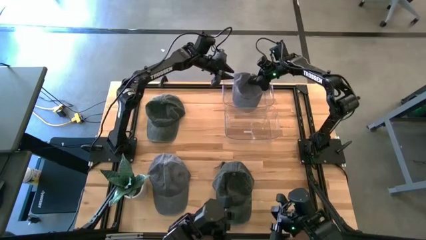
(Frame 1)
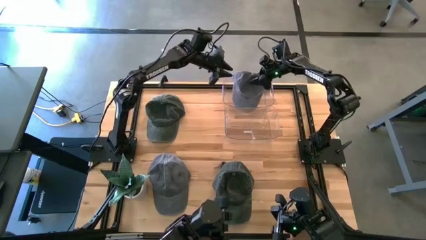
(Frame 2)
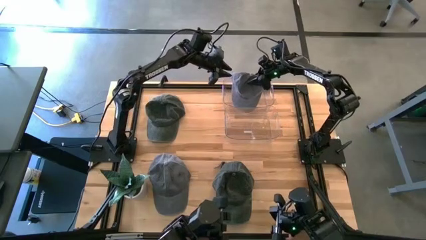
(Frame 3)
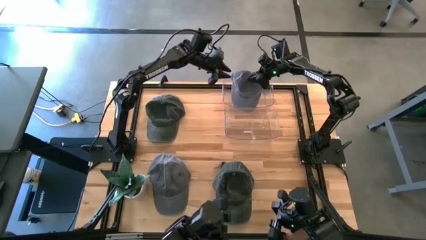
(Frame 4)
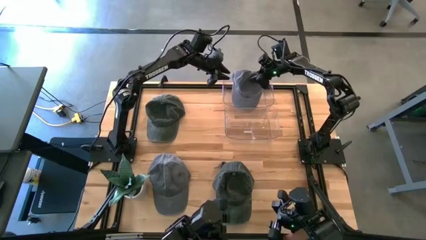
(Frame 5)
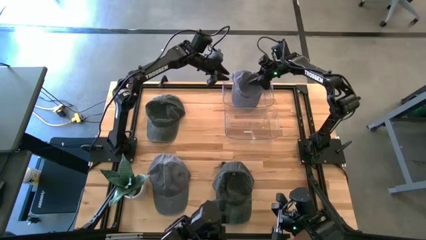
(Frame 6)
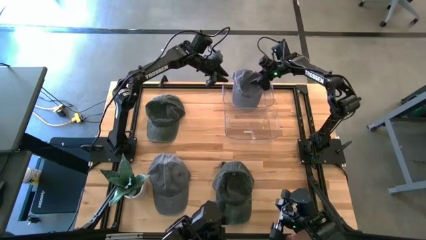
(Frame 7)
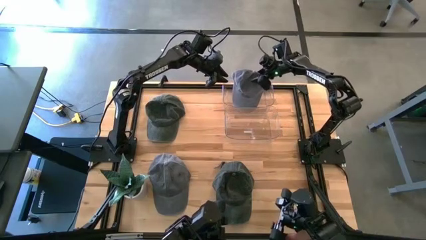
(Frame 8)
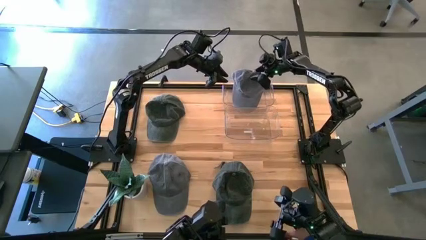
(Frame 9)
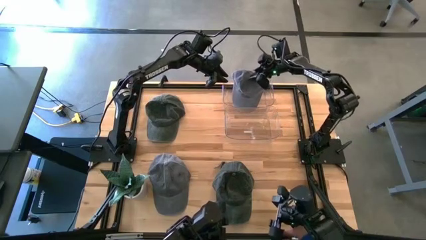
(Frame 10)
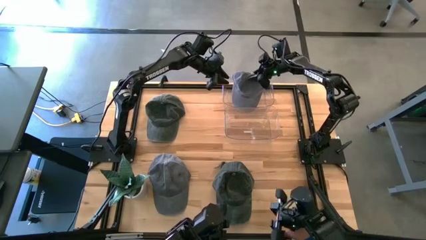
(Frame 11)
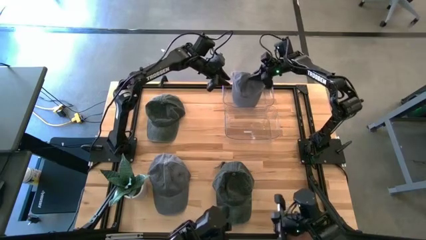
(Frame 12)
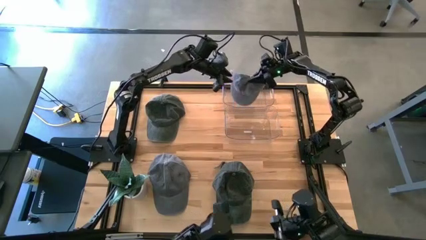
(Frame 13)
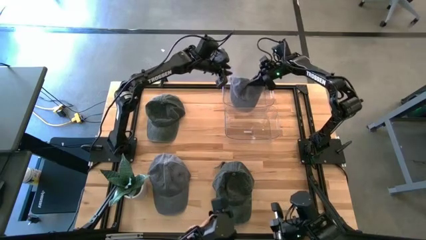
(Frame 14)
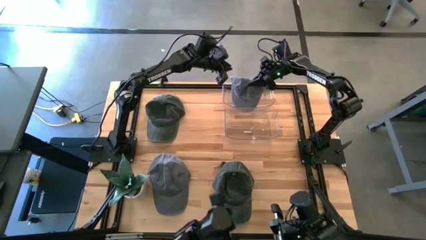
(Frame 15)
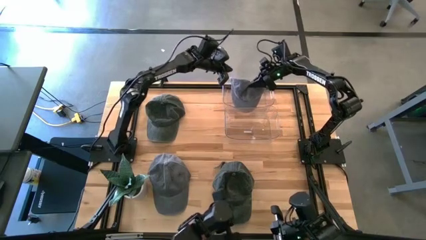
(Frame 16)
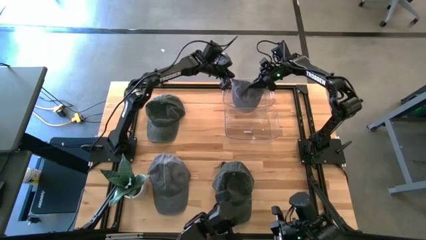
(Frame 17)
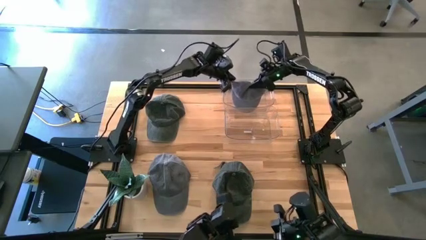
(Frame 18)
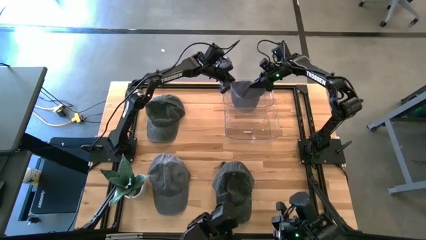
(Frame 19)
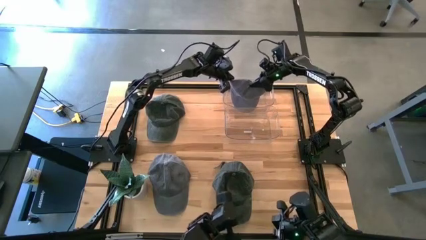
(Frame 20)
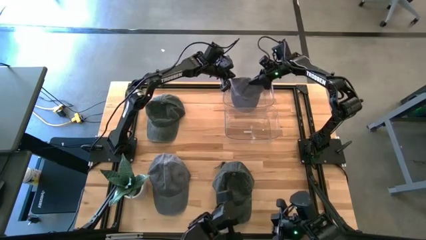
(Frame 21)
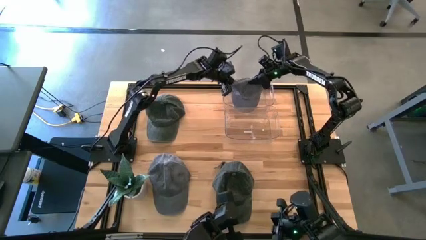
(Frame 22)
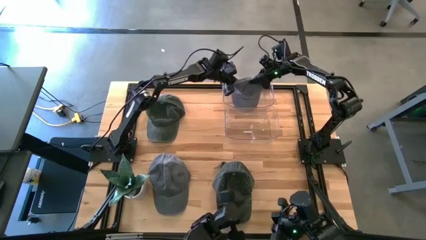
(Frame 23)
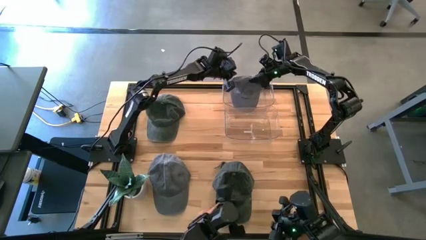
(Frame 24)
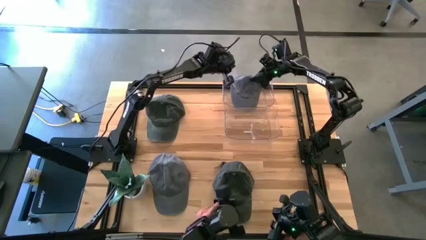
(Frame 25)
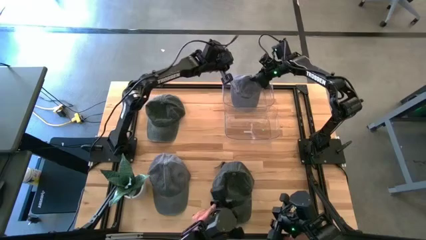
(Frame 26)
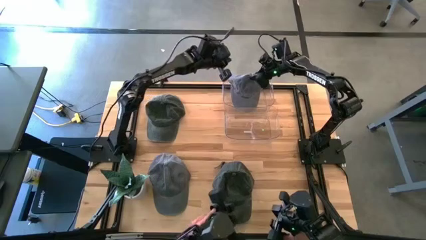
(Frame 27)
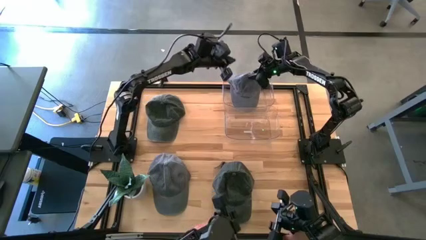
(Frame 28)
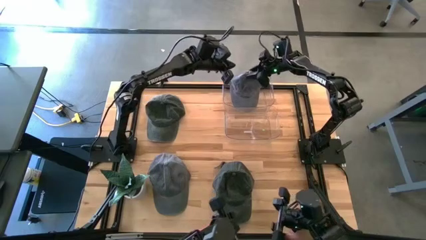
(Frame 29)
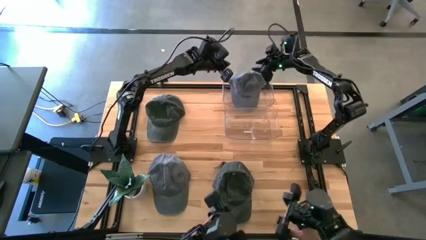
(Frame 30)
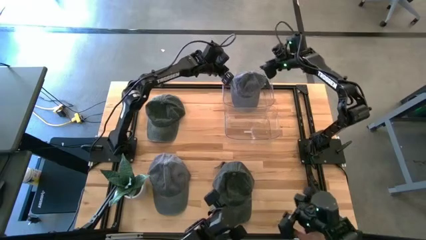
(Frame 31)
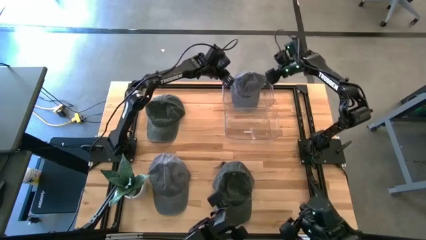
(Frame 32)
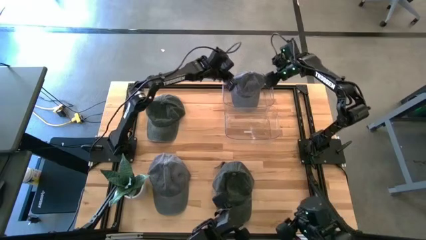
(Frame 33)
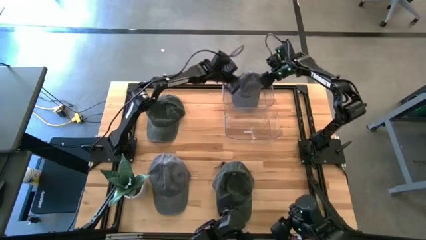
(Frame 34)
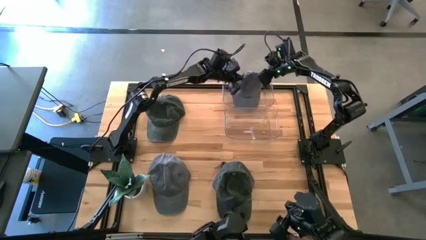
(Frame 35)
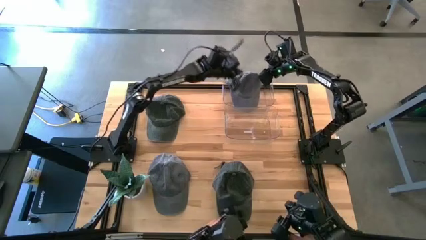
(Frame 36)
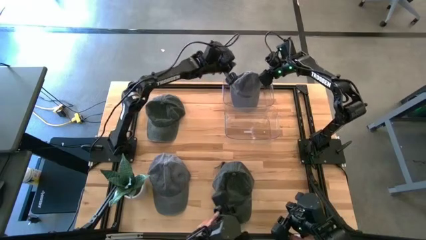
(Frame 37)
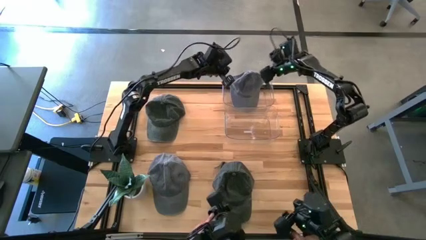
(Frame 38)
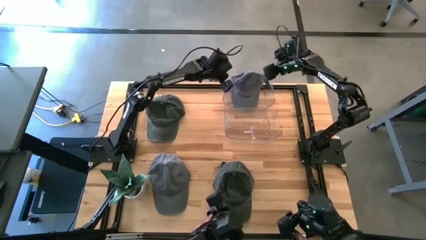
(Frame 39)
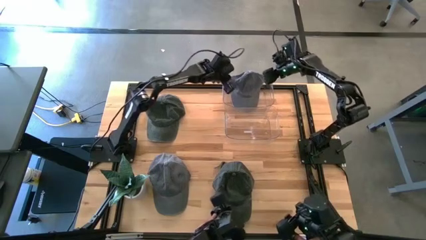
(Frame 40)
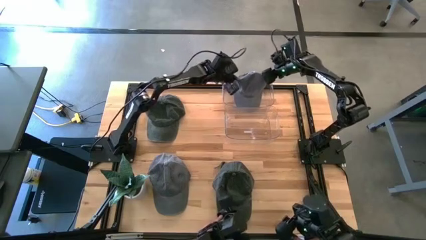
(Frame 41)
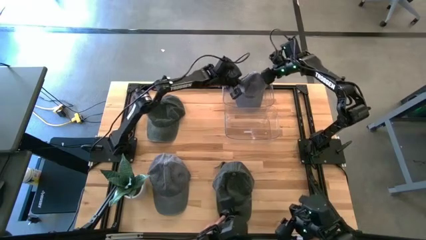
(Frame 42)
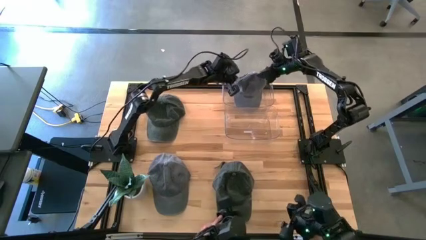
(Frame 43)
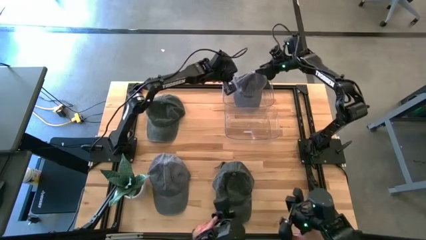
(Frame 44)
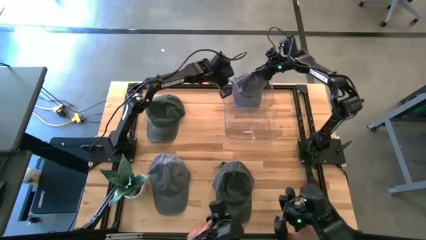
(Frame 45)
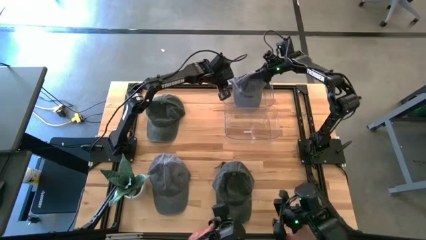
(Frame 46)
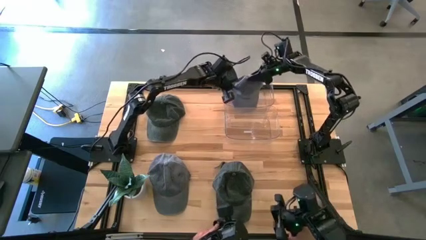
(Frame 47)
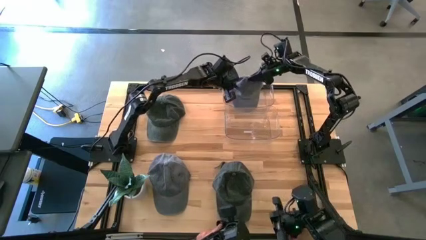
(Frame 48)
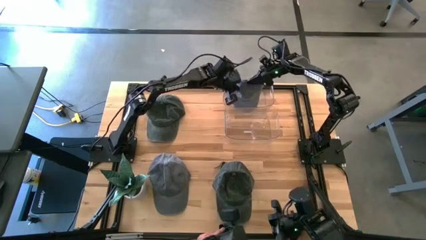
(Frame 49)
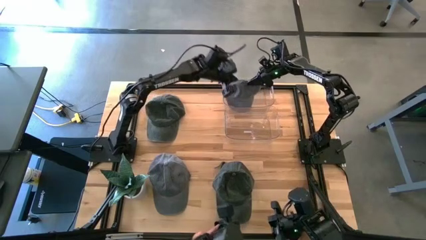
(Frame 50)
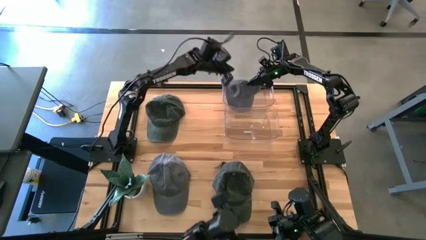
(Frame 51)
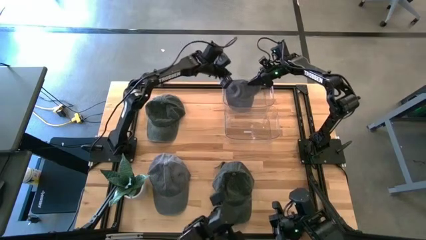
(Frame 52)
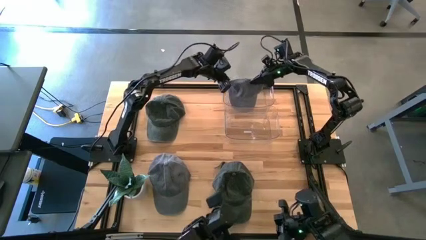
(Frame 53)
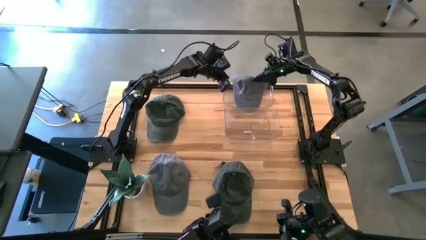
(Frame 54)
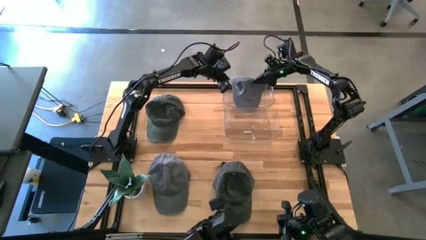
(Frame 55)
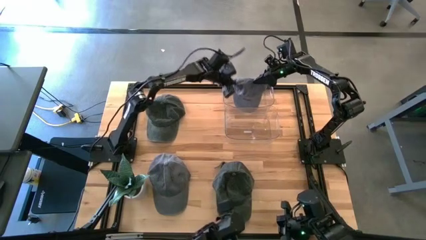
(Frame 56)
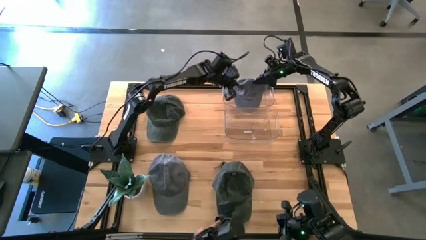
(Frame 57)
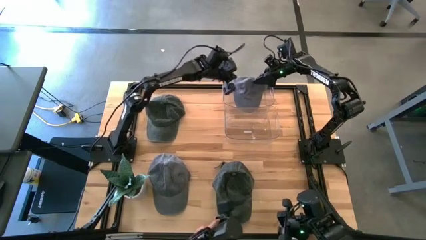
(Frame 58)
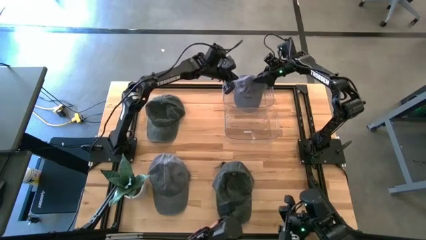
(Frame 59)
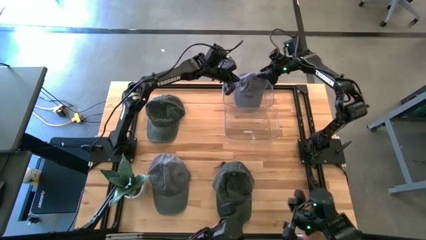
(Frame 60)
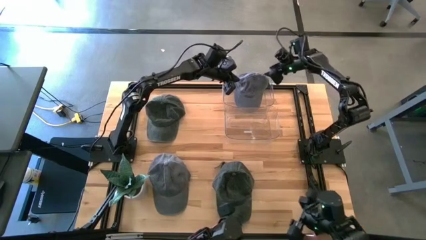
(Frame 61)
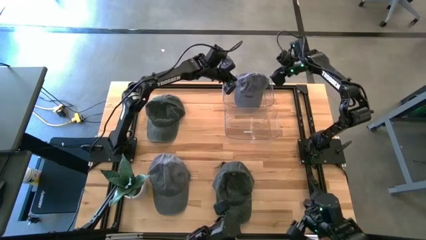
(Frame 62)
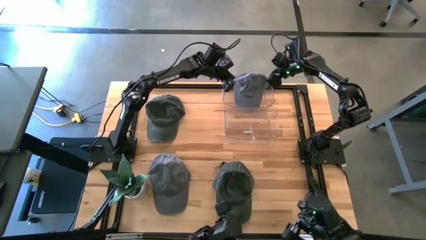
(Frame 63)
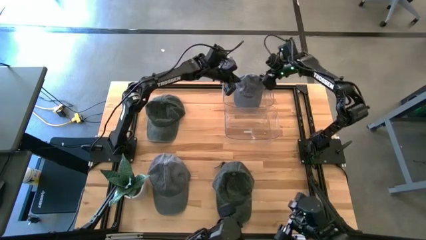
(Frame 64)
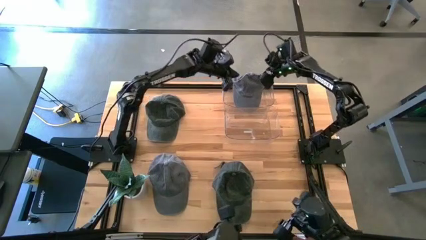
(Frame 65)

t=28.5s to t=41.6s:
Task: Pick & Place hat
Put the right gray cap into the top transparent bin

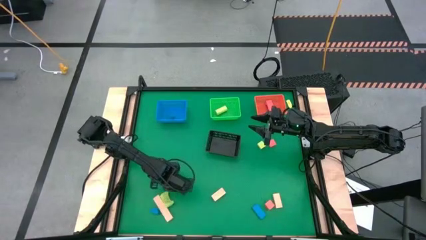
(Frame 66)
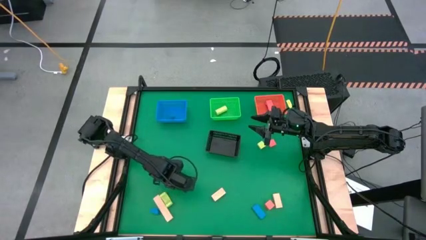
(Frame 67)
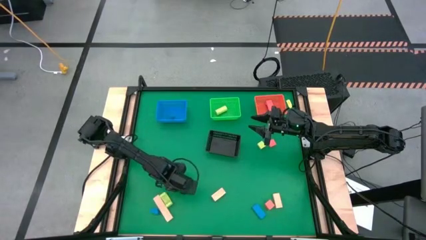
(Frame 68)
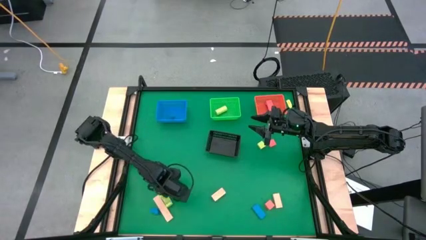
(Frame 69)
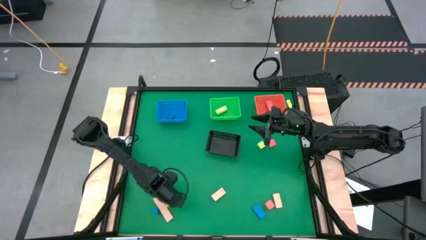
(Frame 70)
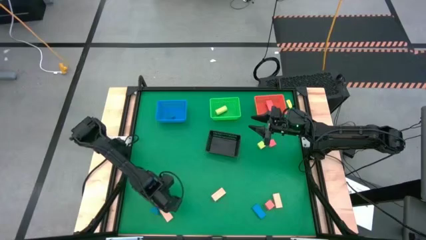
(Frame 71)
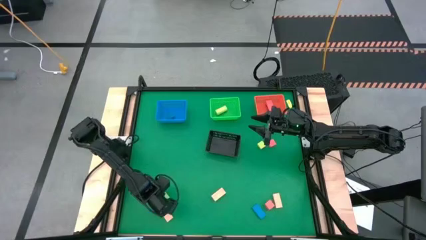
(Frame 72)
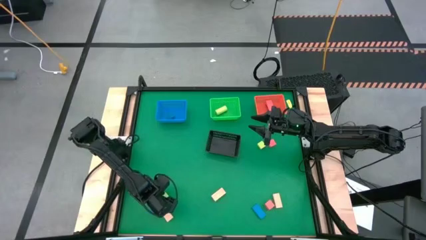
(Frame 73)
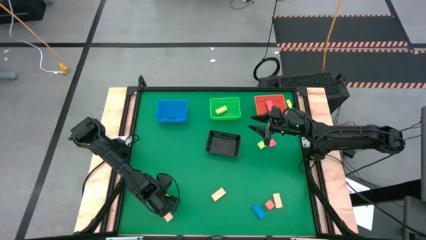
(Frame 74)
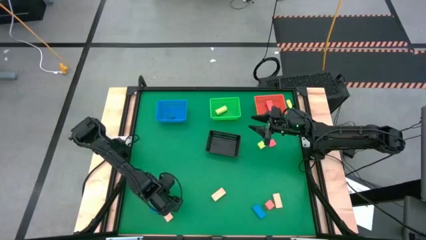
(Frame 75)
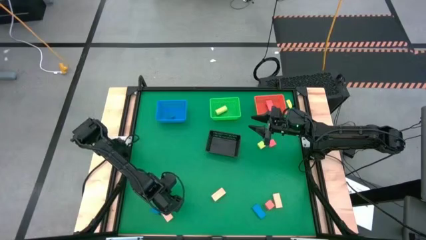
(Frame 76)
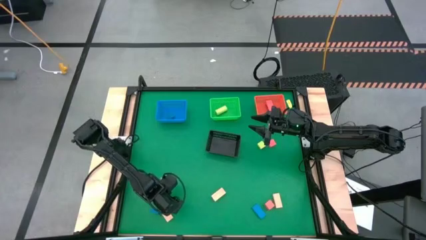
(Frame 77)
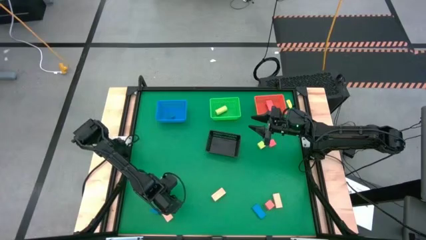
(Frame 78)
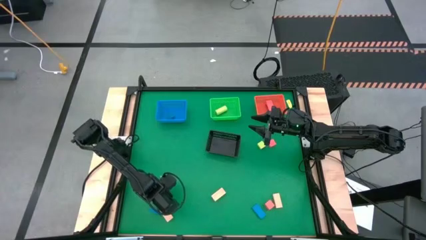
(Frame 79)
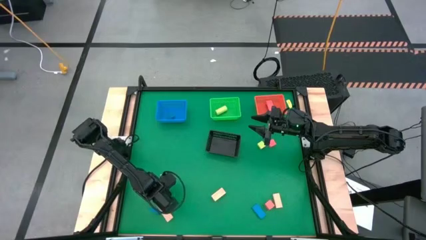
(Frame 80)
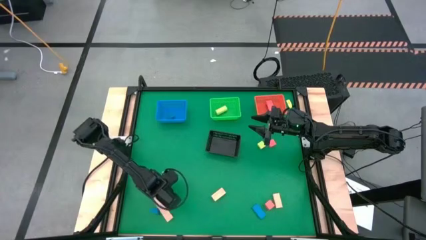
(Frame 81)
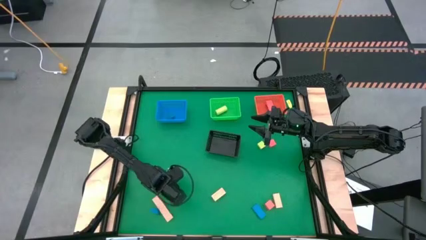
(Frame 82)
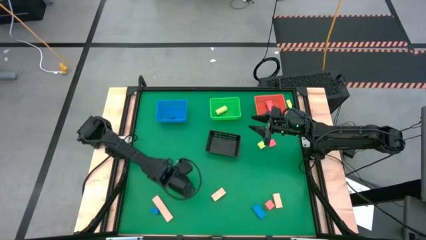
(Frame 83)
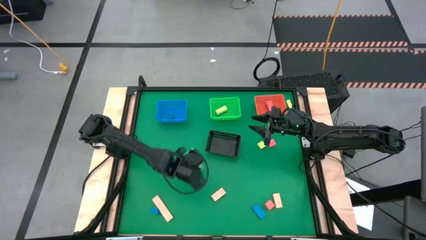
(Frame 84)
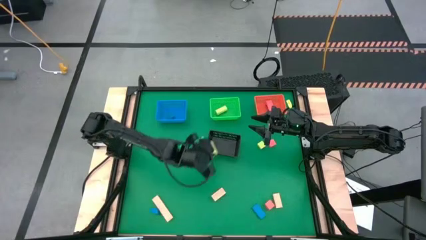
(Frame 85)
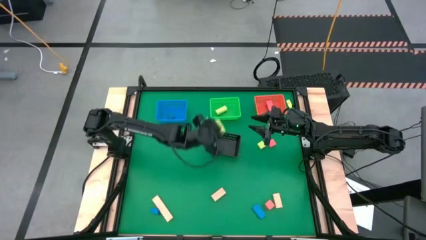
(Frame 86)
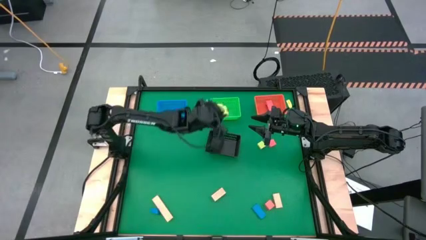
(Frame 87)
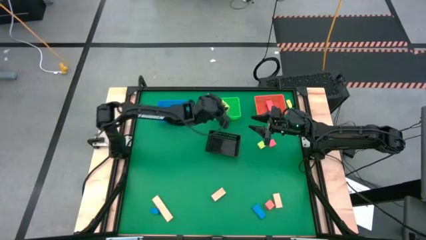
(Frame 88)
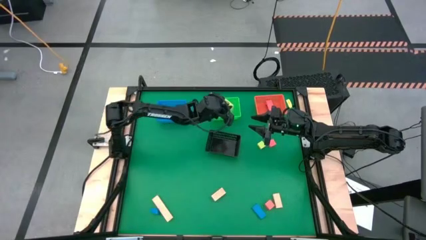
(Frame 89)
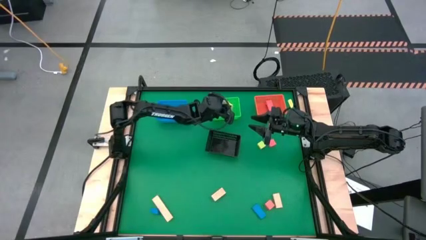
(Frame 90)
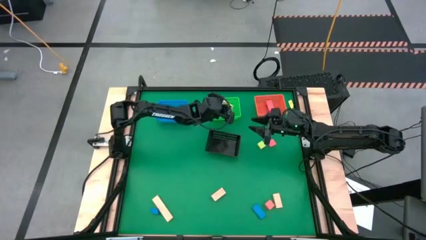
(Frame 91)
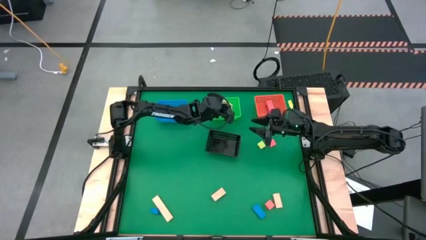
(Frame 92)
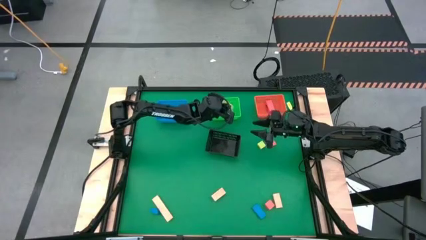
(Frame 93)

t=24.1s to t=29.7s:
Task: Sort & place blocks by color
Put the bottom green block into the green bin
